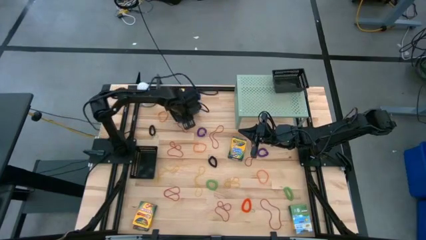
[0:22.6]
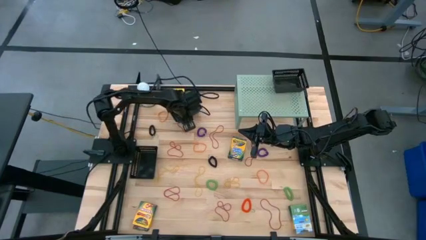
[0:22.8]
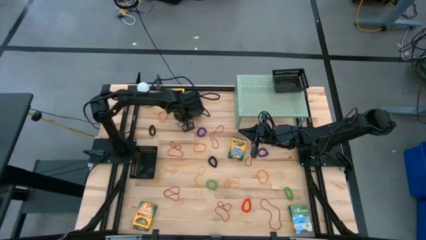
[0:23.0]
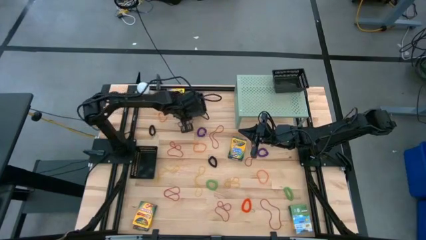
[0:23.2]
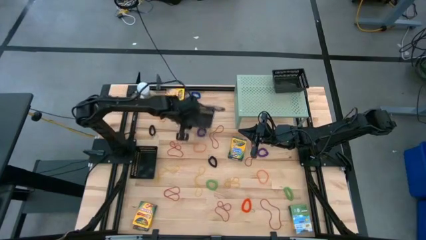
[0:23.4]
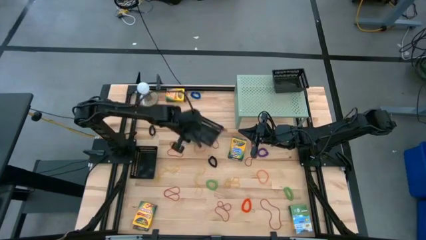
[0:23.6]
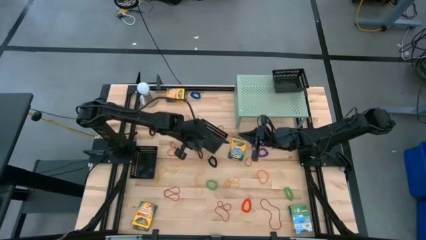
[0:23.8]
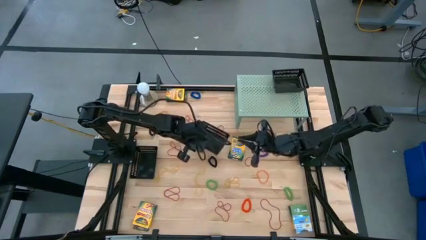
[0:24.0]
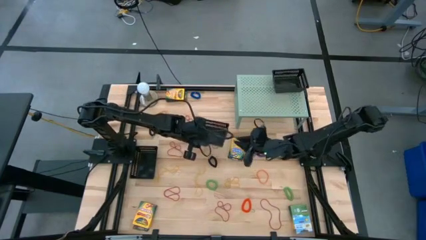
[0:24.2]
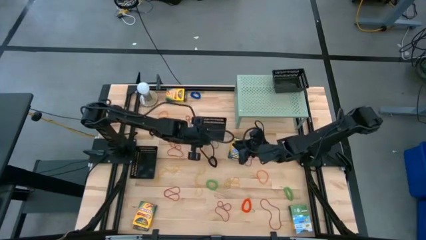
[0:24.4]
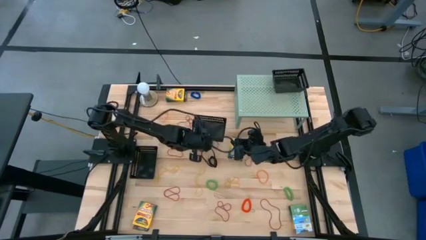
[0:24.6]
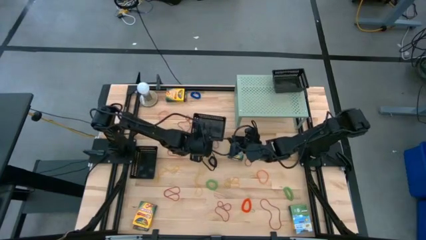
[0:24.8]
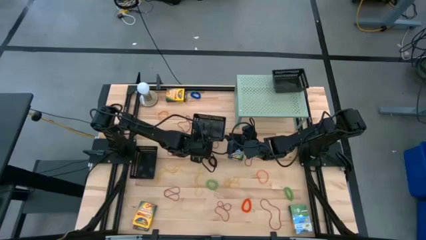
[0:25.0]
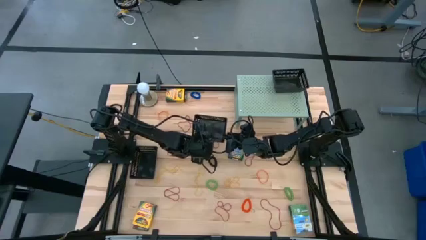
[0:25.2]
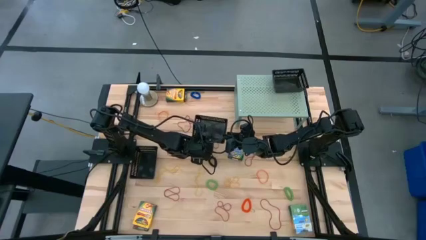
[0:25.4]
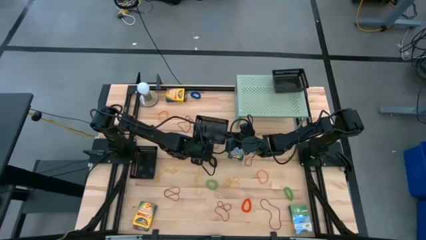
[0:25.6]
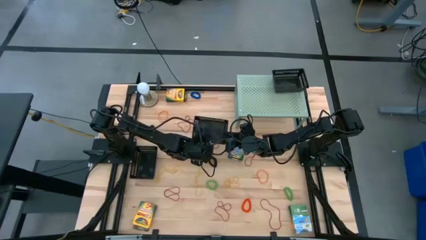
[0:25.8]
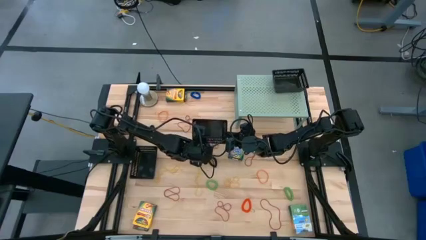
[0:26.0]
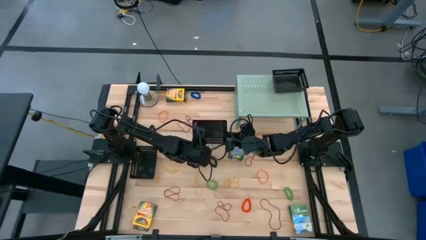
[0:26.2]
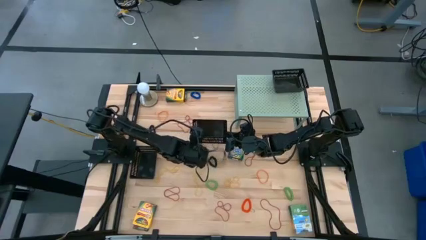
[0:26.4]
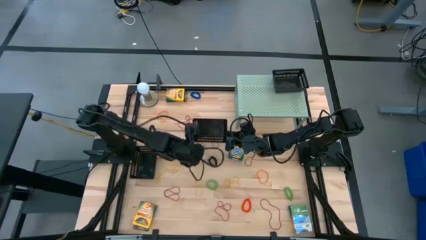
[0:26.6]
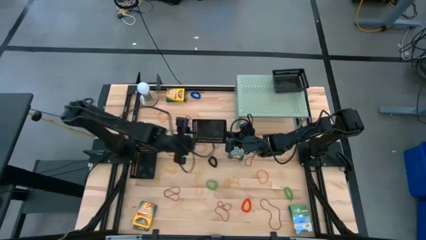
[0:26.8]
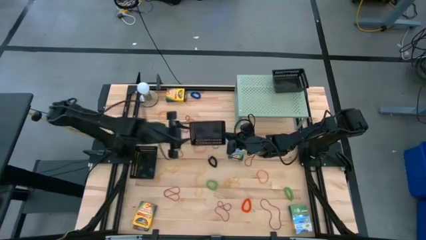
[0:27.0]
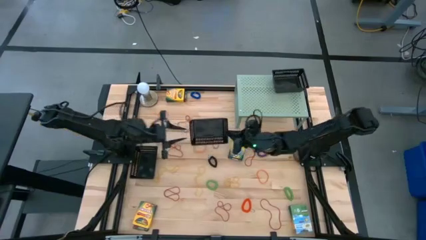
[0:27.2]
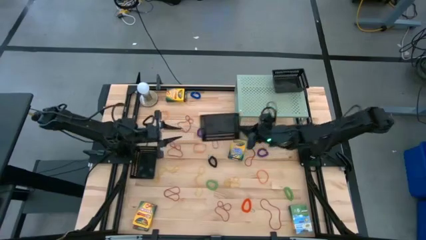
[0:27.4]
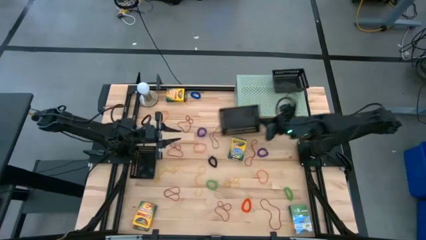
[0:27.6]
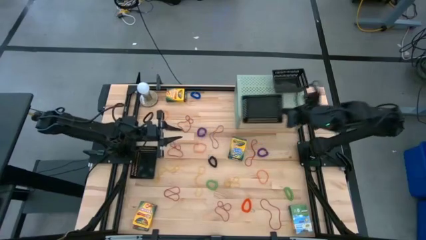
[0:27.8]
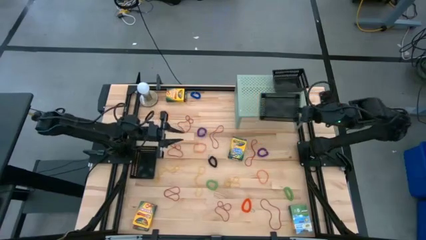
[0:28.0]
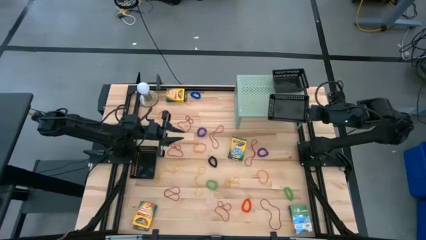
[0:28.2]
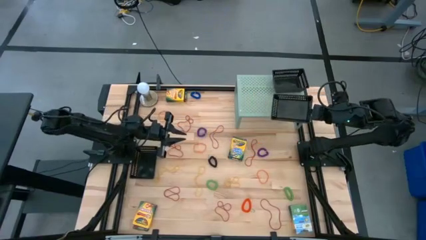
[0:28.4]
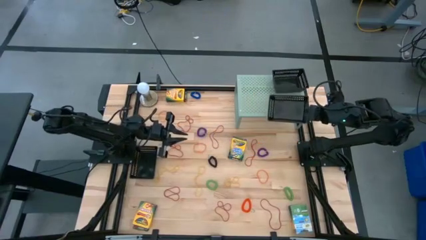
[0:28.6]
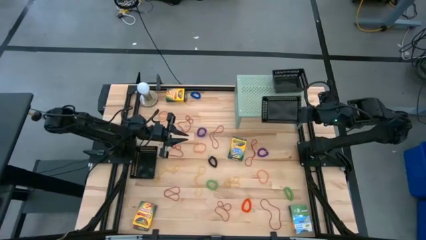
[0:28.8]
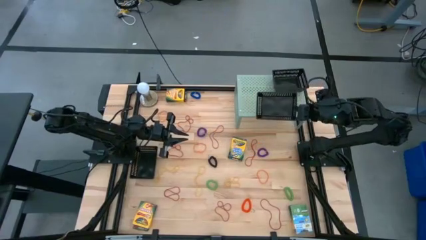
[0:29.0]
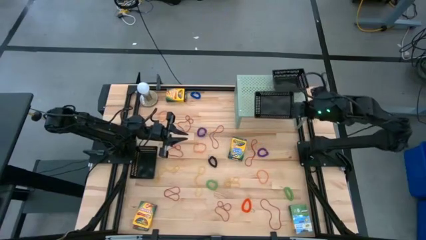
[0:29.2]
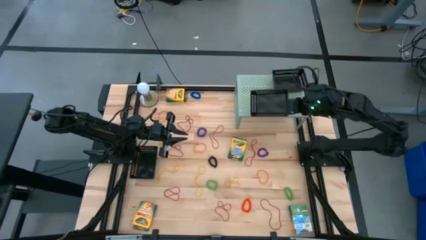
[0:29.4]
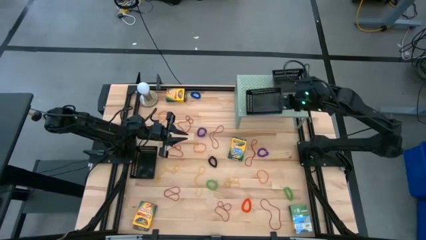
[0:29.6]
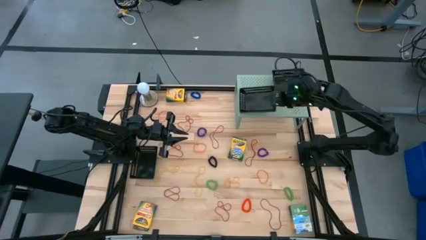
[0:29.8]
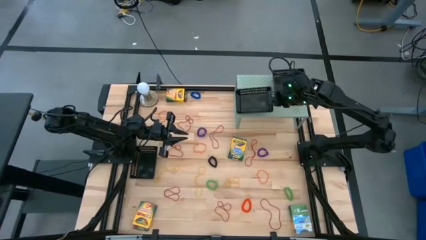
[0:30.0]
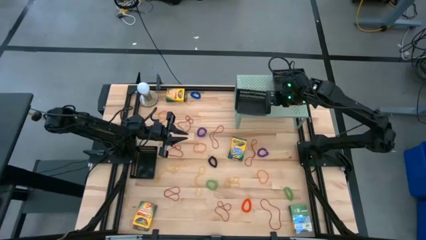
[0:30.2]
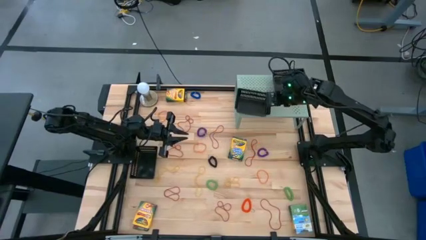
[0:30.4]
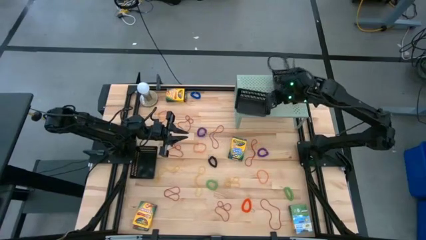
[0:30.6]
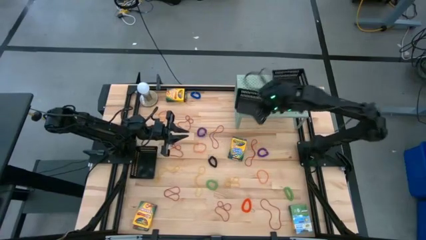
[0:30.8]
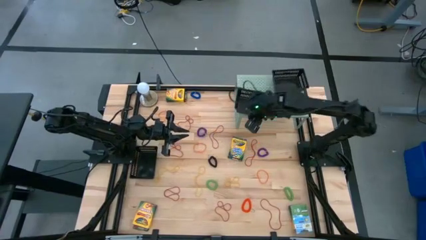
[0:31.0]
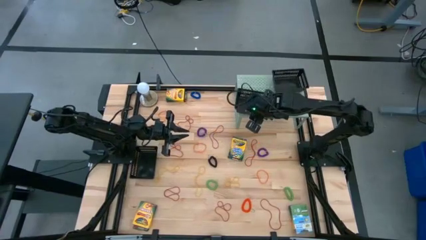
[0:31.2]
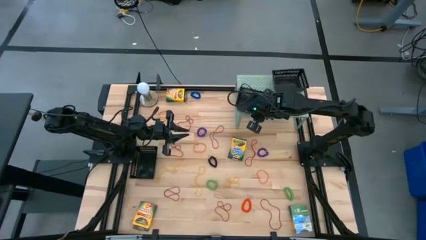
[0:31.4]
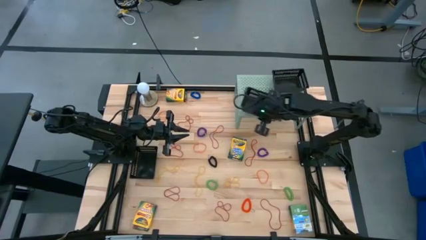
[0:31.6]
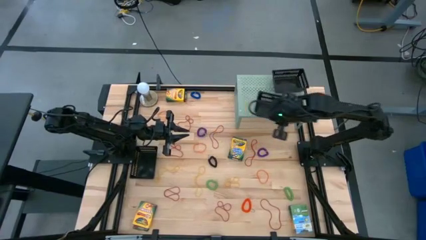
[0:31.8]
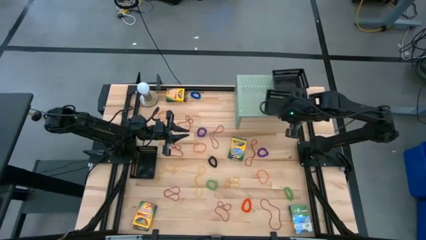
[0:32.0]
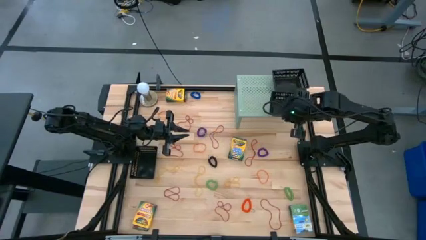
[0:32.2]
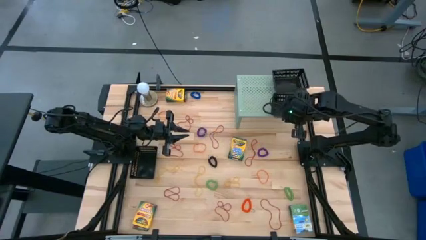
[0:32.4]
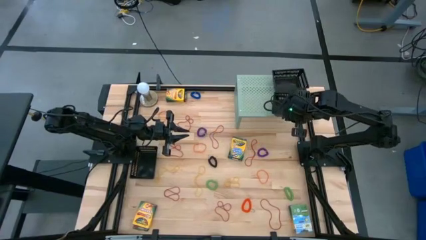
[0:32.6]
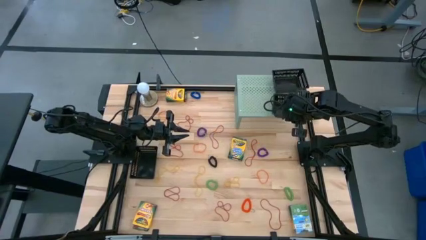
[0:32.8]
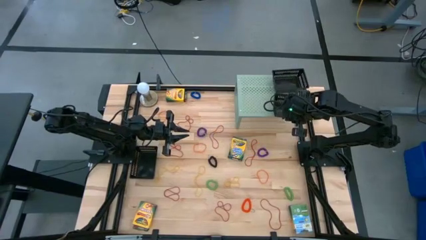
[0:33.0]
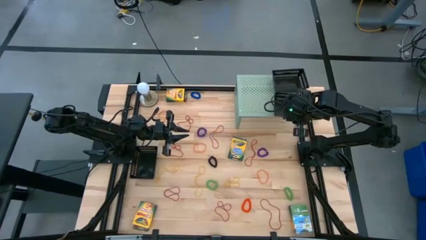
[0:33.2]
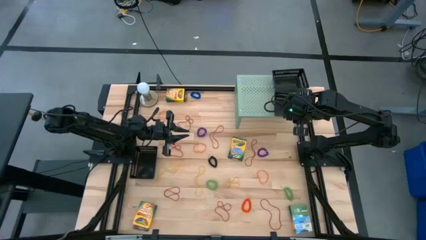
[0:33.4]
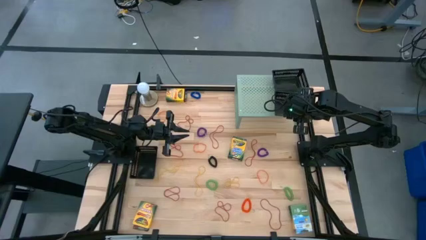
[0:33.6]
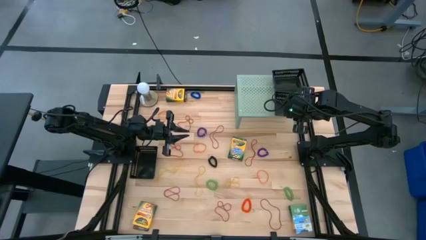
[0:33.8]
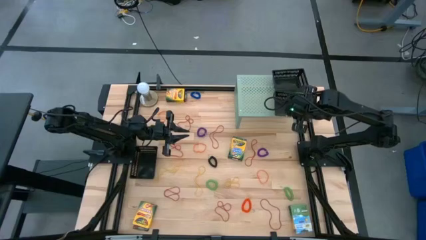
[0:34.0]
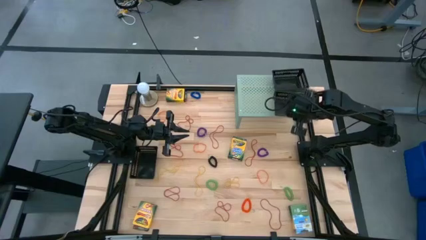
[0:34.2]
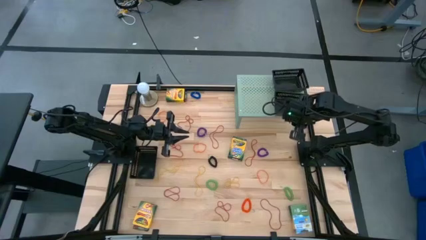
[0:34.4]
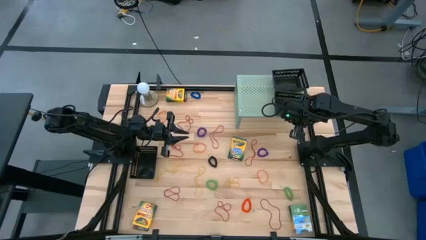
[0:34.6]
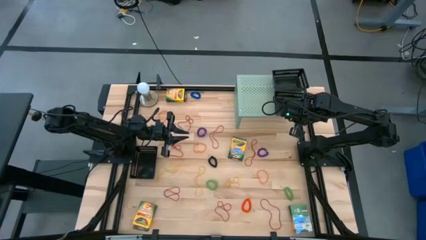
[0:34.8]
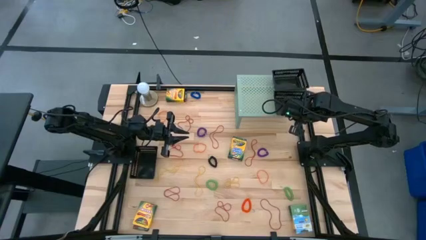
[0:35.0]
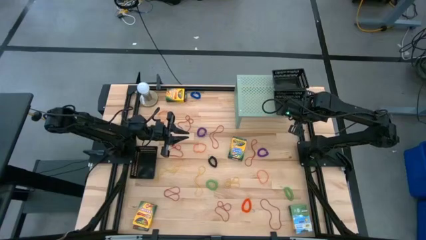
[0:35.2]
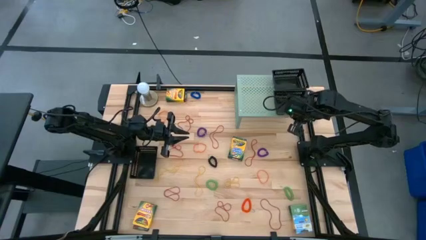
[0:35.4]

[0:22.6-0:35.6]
Task: Pick & Place Office Desk Supplies
Put the top black bin on the shelf

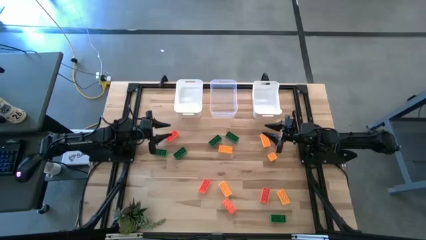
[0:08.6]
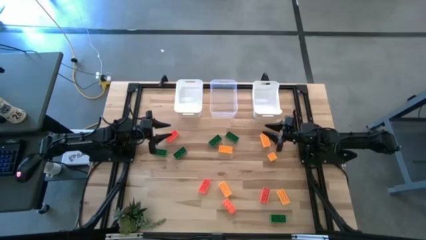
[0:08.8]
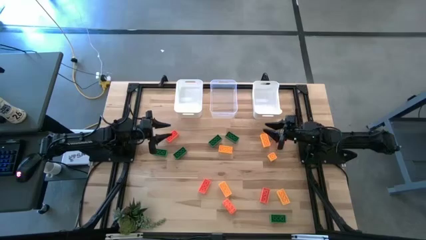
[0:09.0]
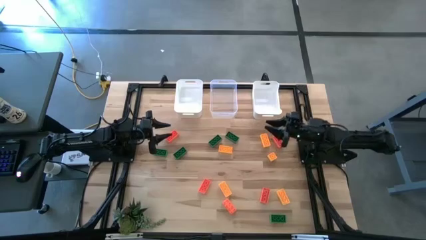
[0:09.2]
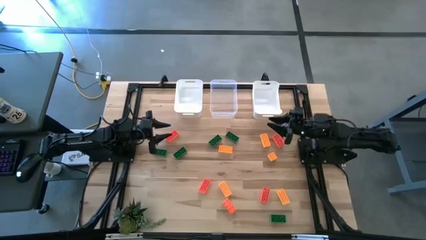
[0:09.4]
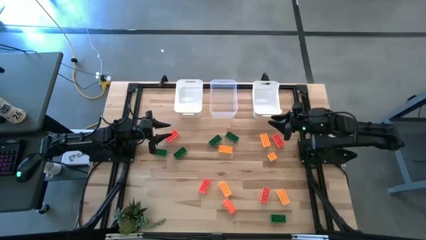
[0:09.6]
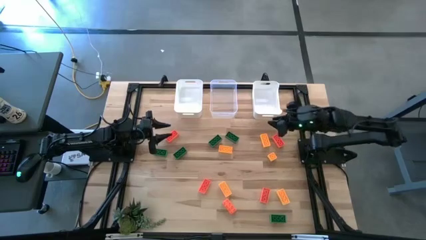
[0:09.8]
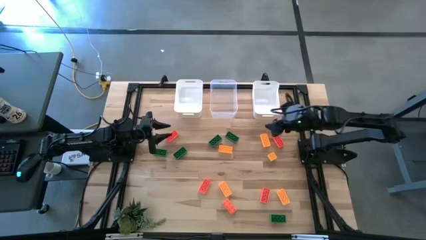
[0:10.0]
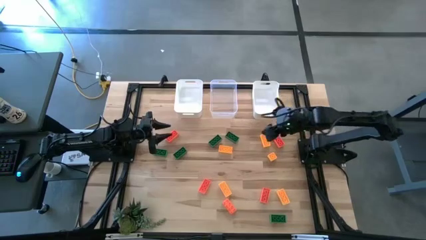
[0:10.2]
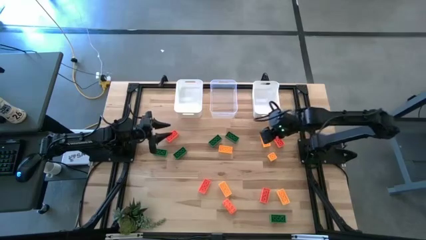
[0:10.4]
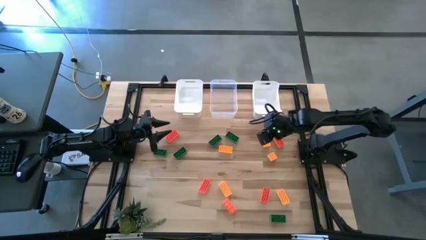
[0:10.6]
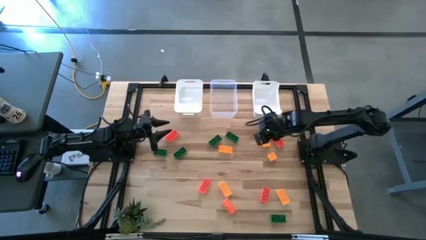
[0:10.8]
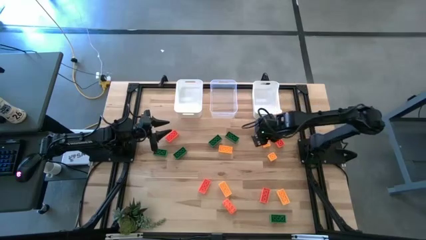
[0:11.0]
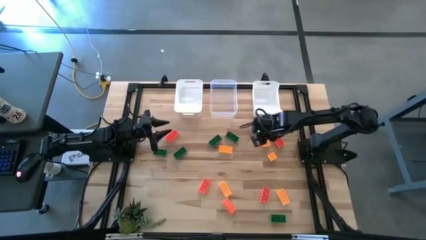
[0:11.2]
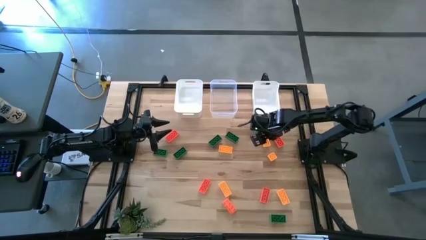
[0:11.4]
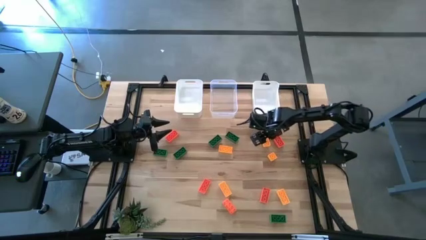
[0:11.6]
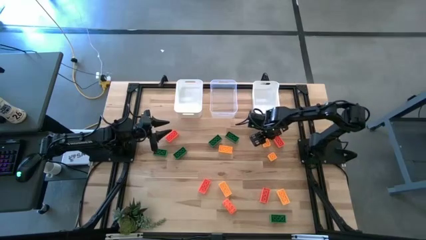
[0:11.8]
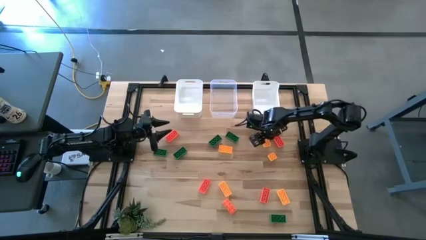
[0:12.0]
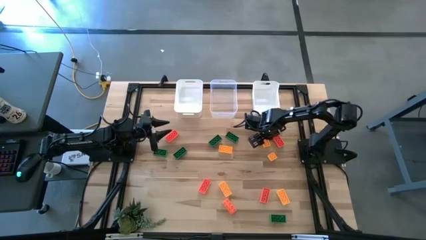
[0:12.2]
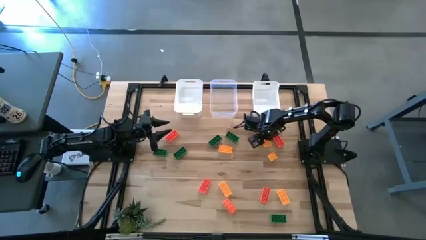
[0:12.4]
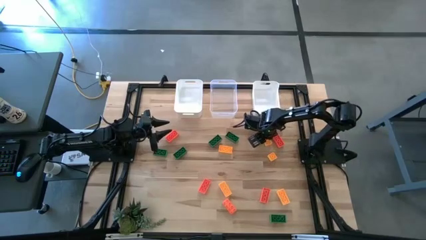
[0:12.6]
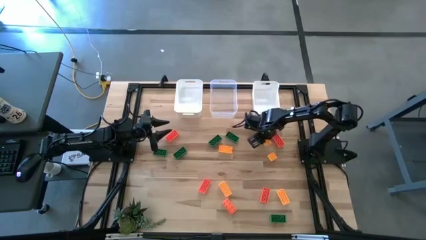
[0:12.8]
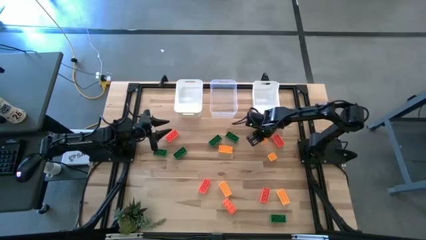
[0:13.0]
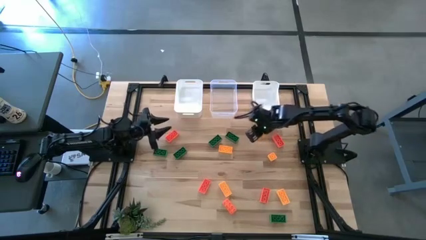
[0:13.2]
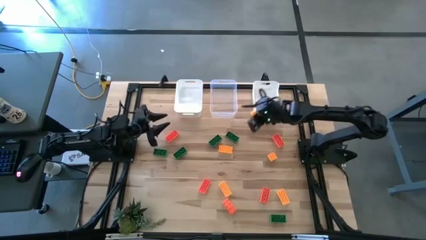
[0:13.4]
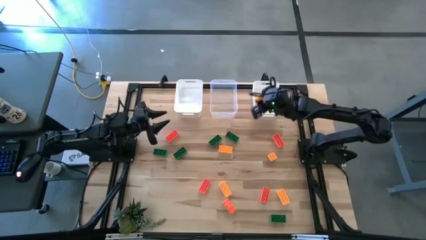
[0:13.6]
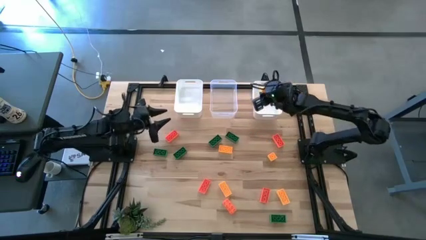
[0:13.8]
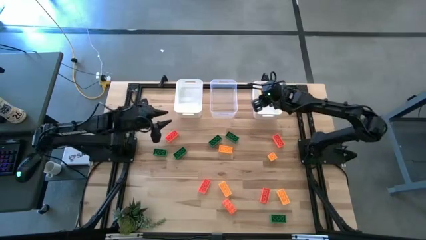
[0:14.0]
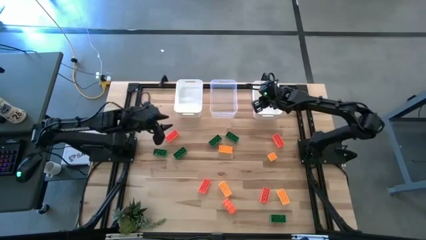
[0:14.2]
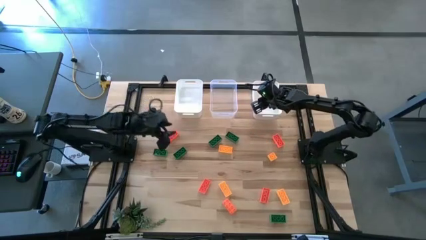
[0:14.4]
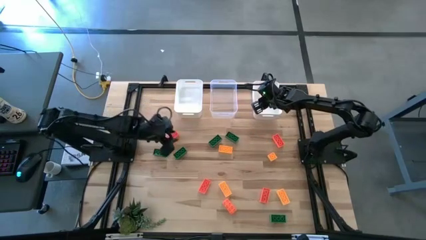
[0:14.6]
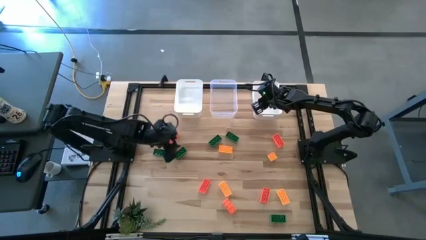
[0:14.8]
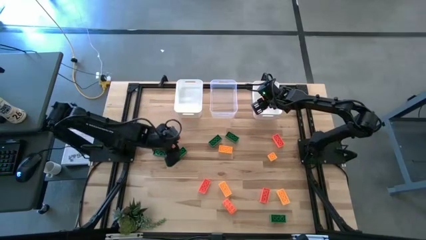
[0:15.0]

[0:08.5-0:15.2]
Task: Sort & place blocks by color
Put the yellow game piece into the right white bin
